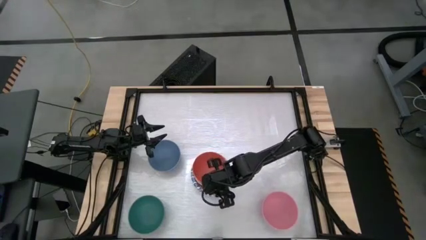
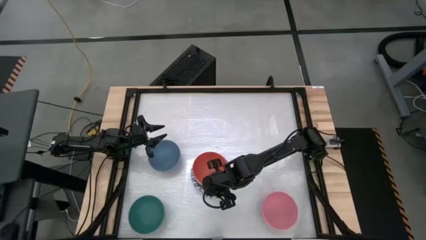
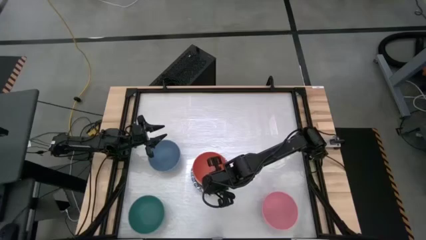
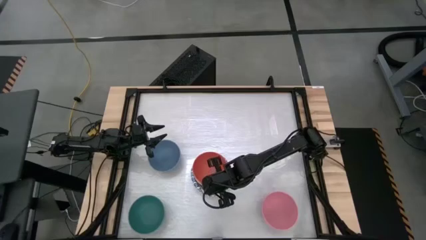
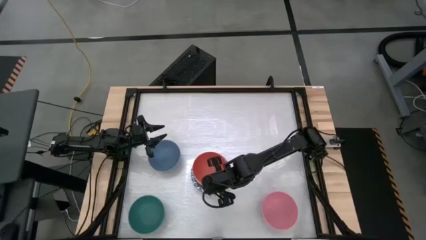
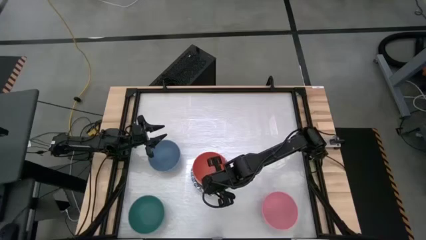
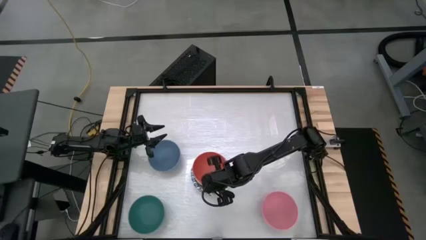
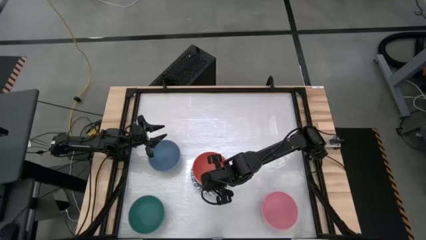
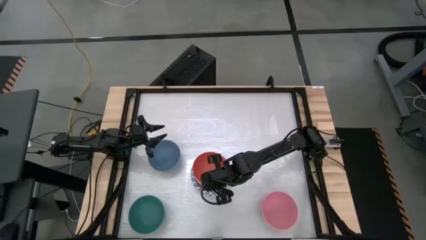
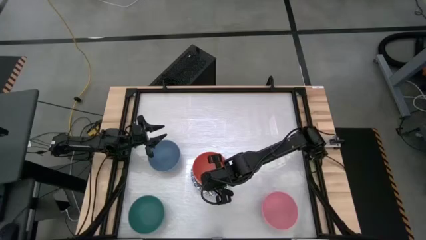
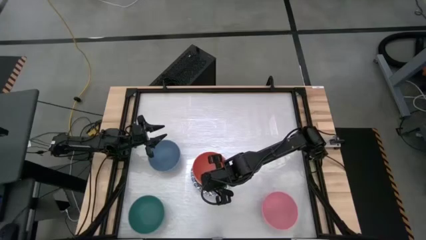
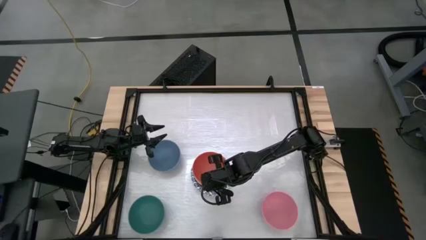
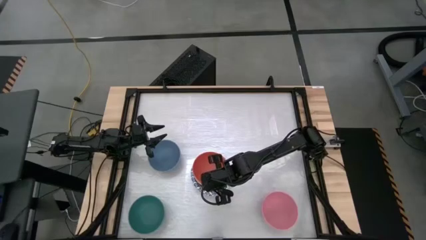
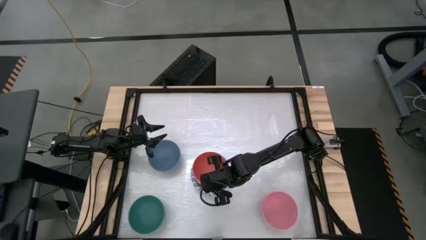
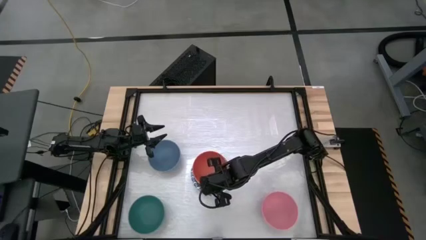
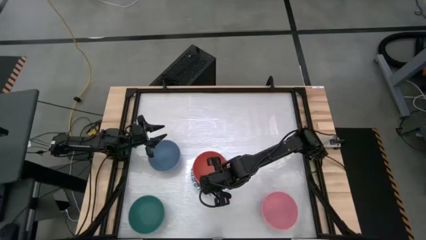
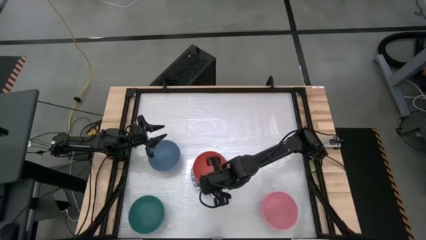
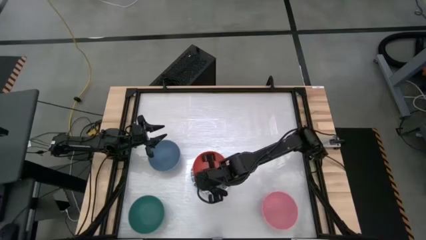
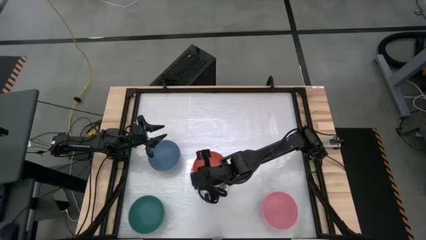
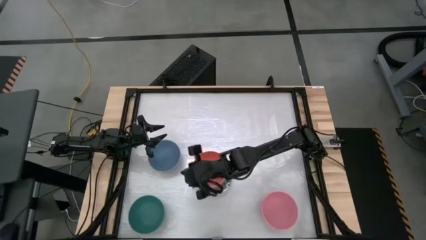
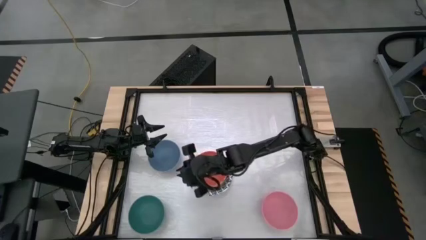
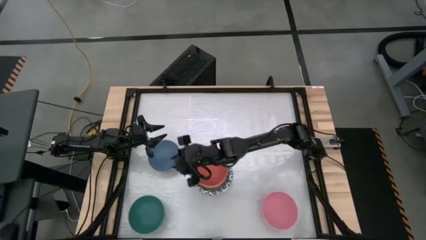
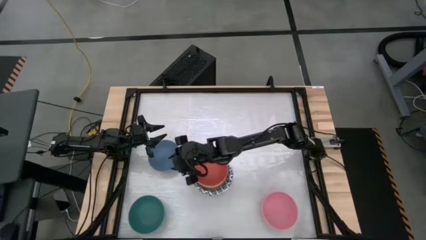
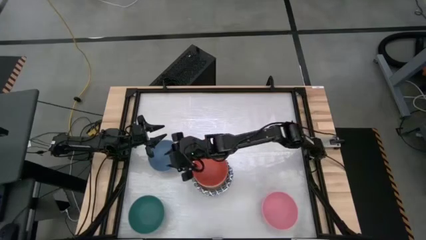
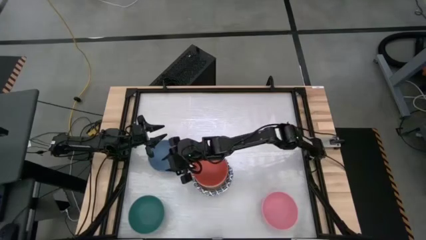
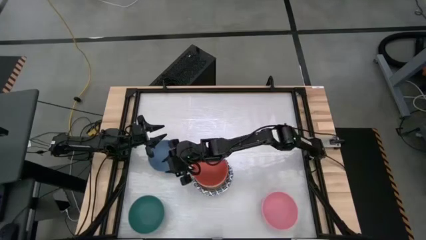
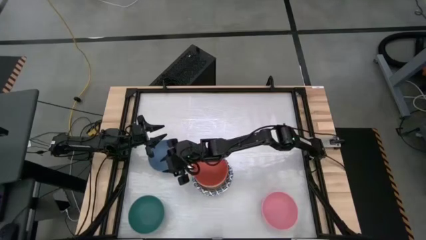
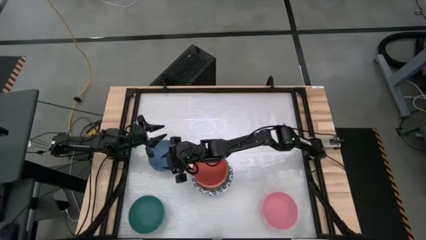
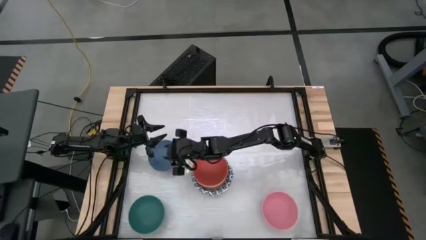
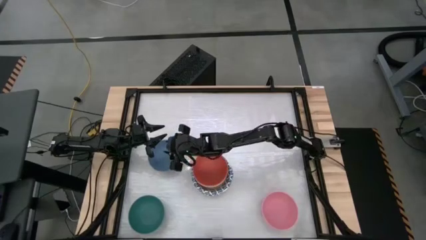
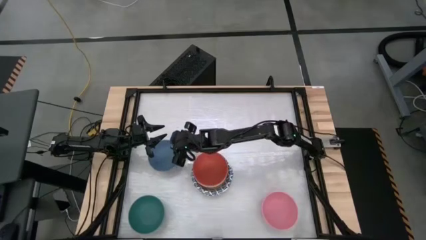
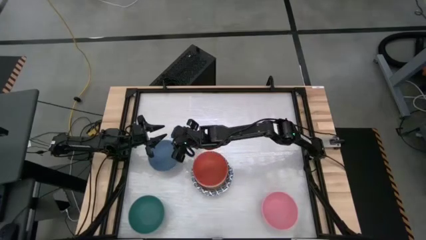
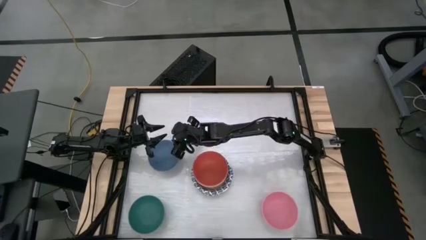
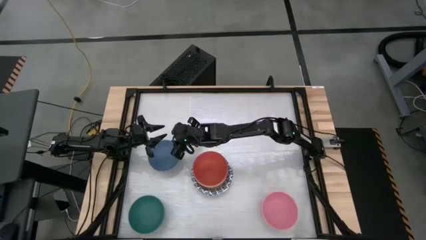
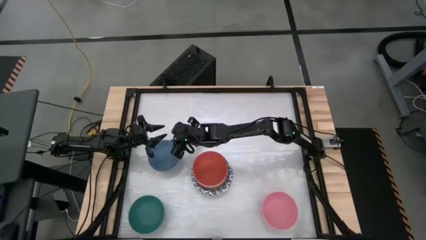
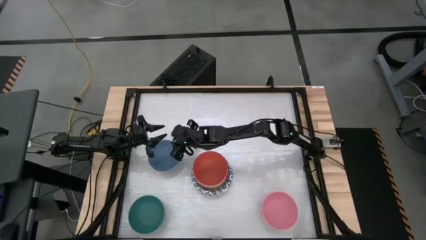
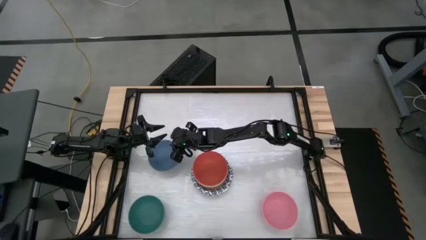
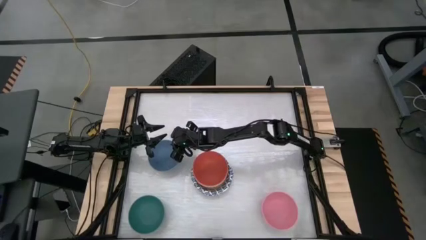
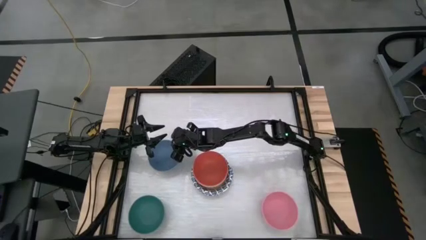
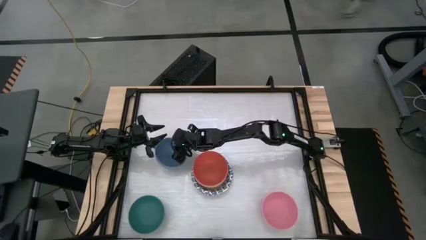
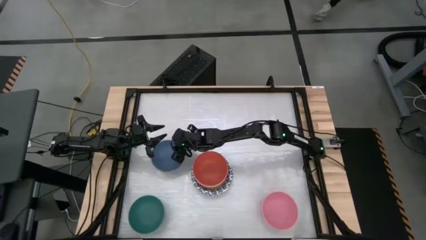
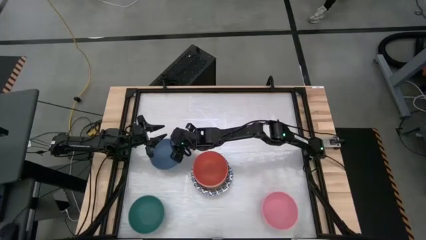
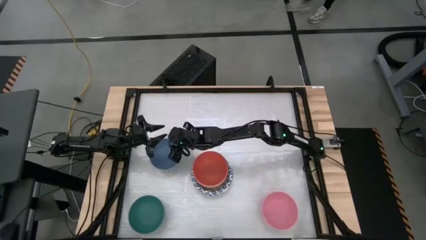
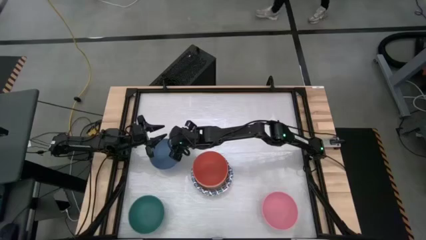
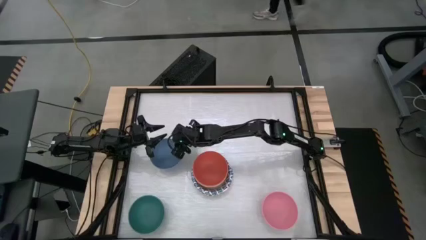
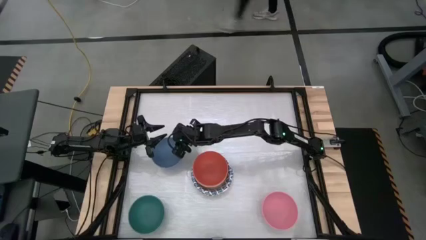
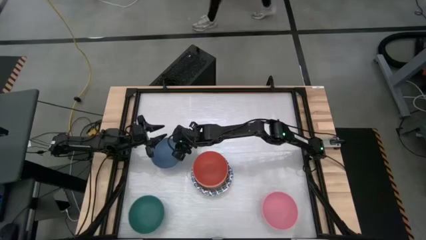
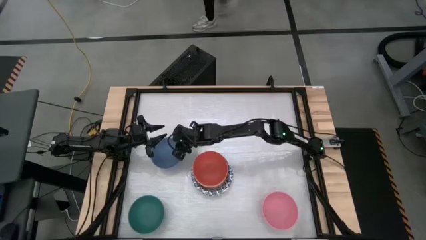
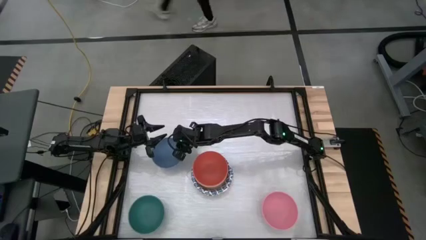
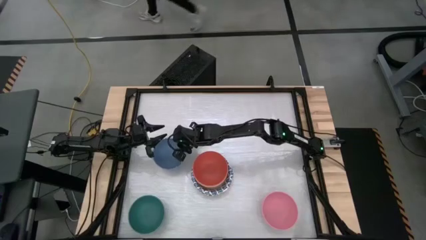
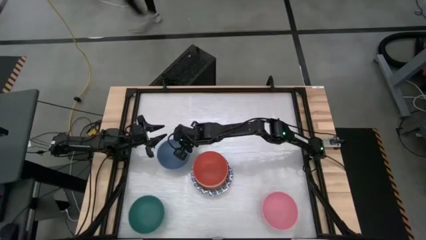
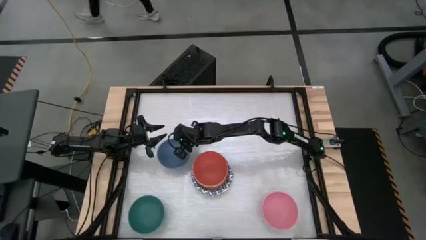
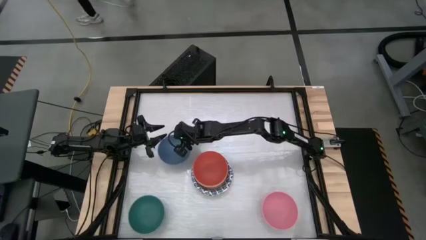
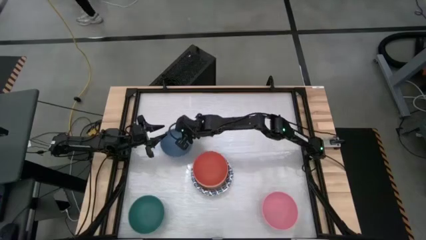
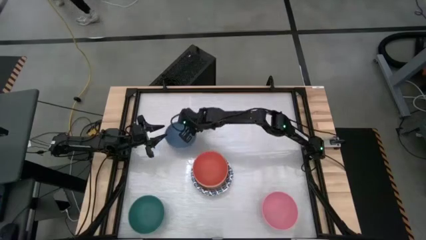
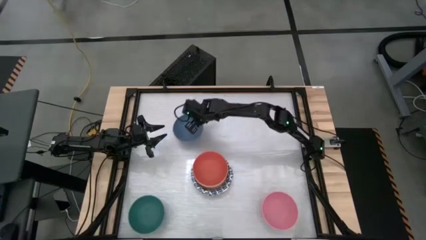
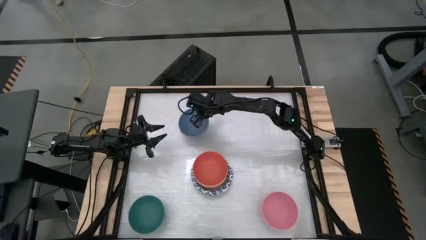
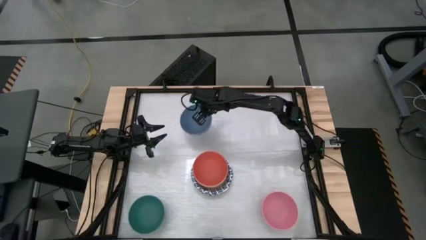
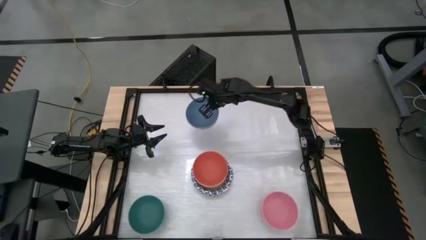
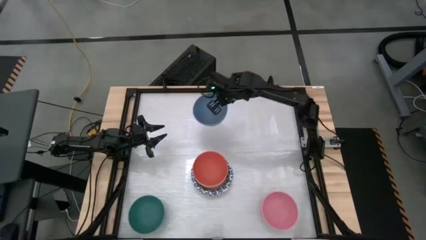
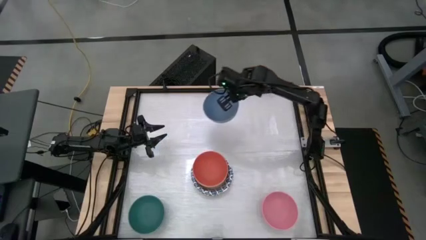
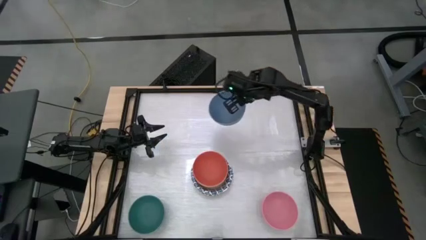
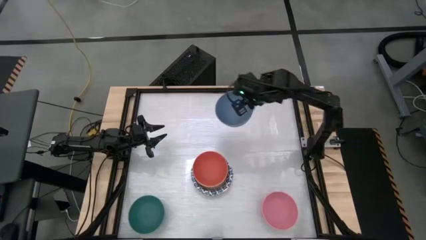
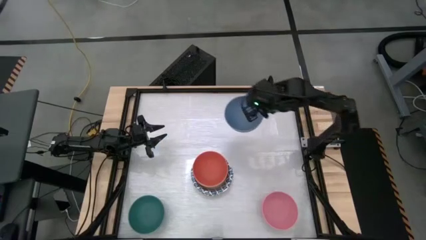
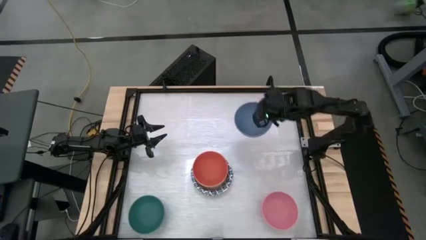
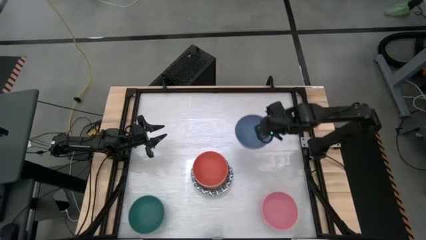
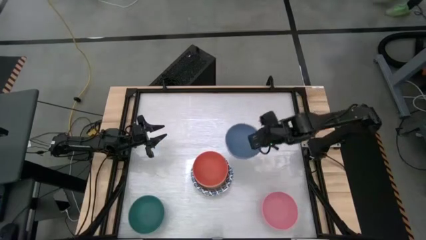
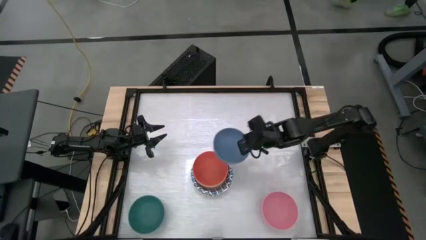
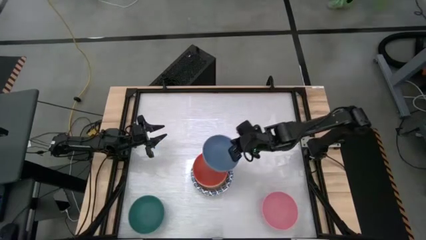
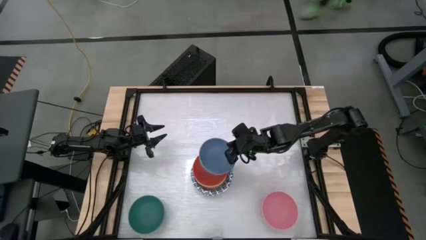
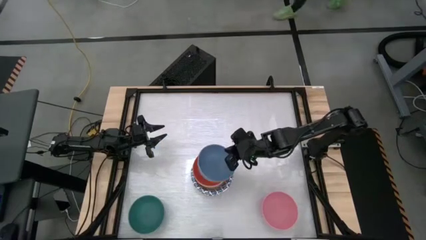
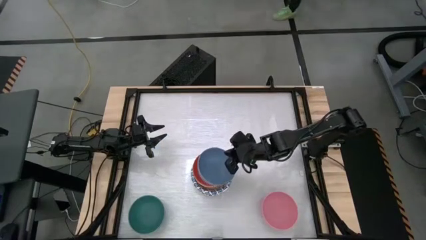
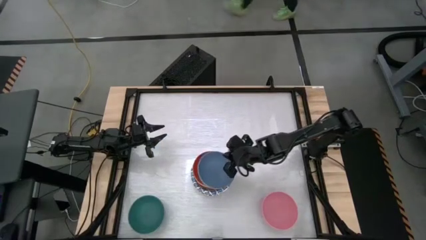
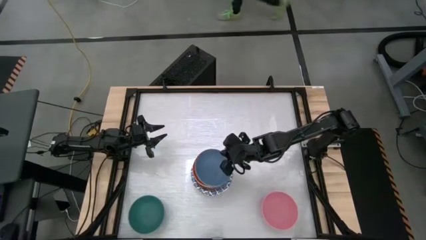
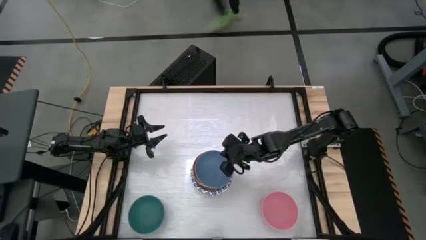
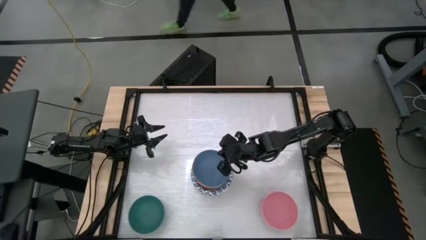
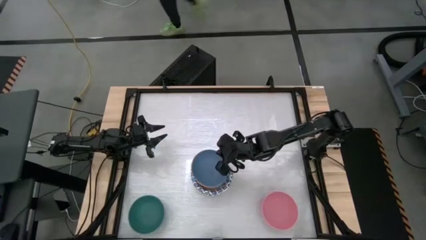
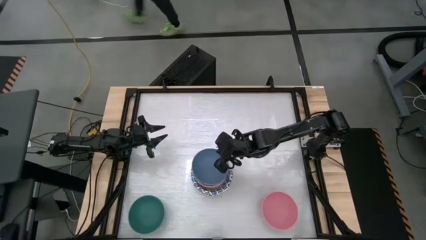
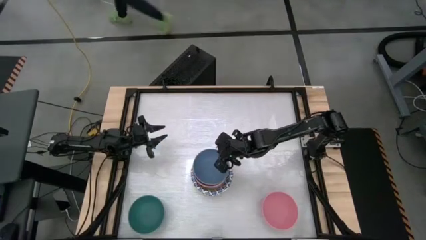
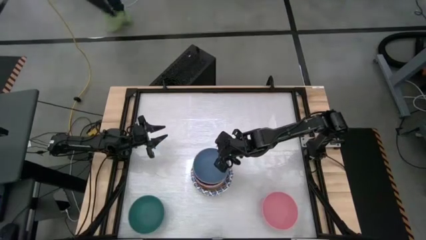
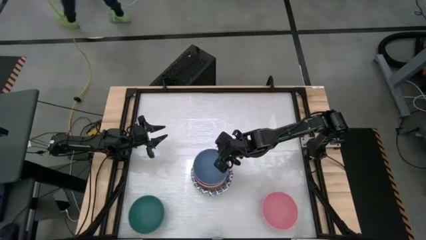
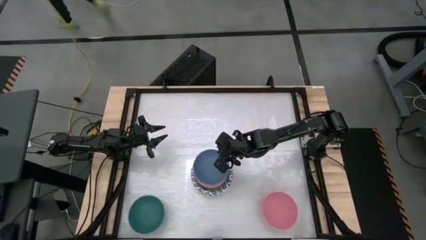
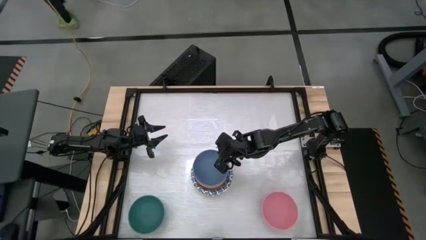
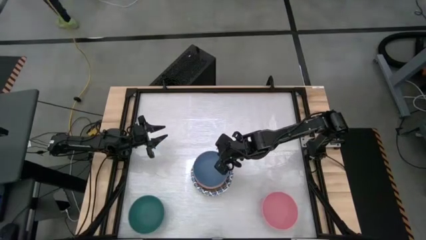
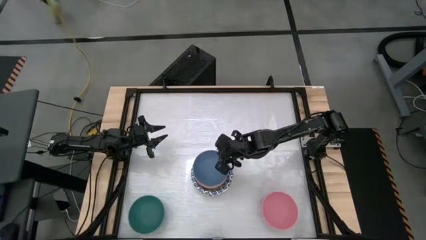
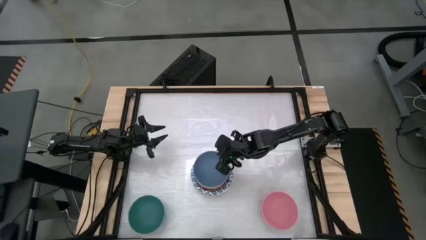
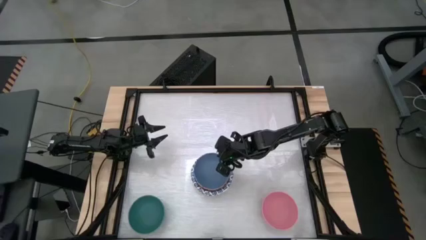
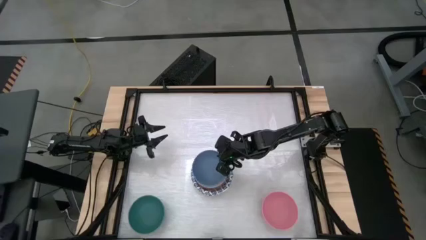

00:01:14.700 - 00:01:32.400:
Task: Nest bowls inside each other by size order
Stack the blue bowl into the red bowl
